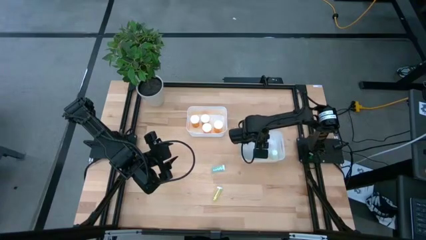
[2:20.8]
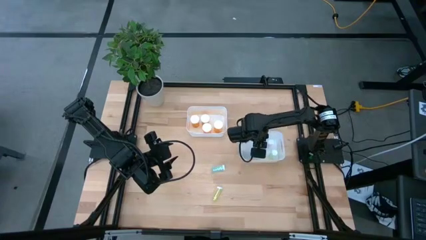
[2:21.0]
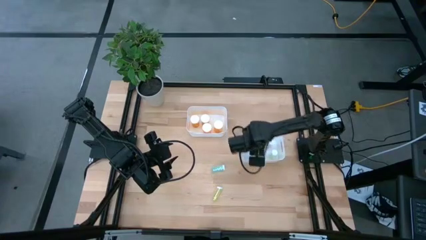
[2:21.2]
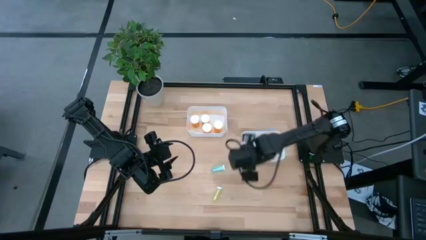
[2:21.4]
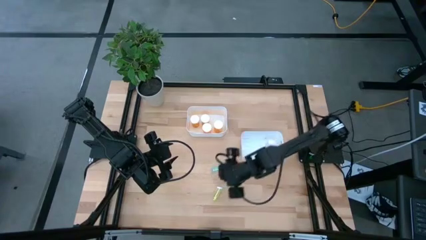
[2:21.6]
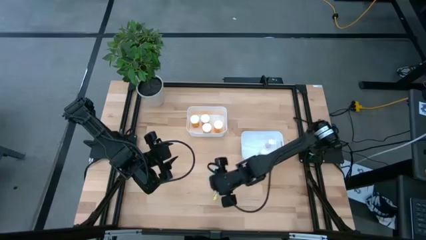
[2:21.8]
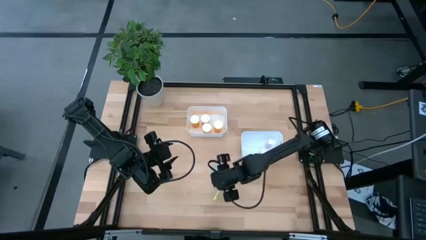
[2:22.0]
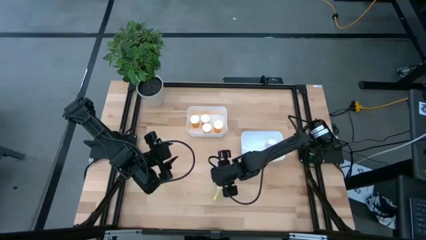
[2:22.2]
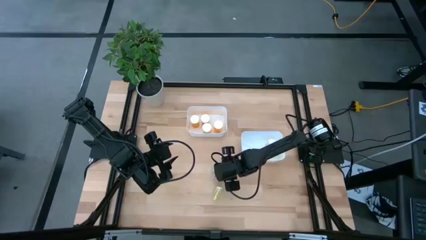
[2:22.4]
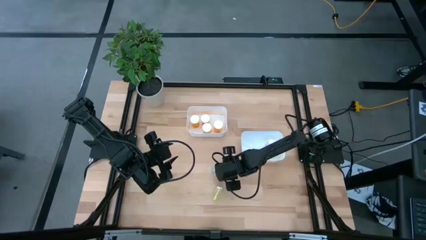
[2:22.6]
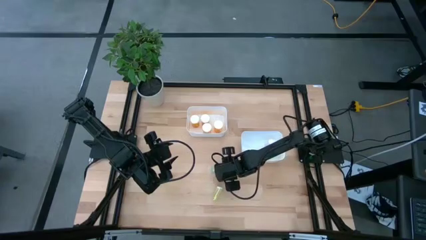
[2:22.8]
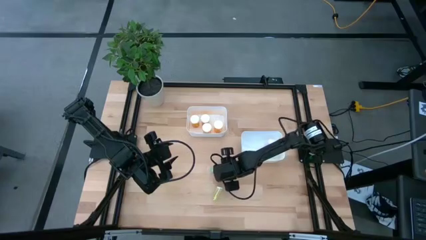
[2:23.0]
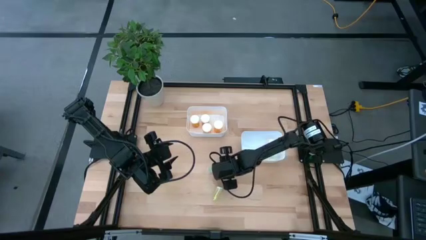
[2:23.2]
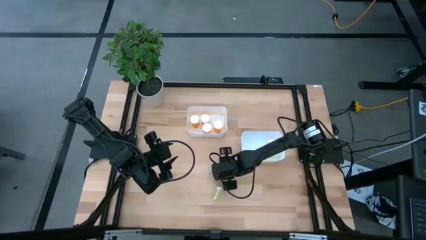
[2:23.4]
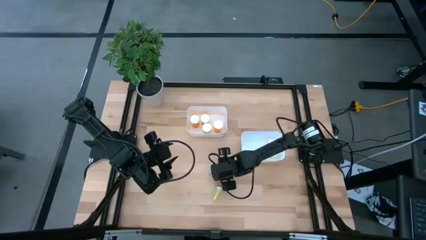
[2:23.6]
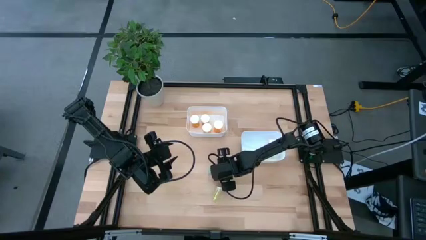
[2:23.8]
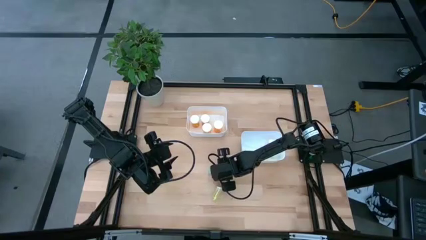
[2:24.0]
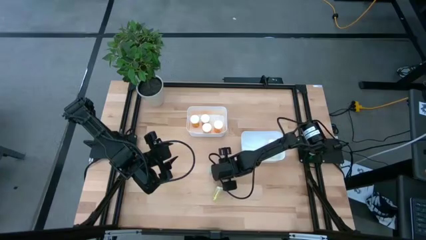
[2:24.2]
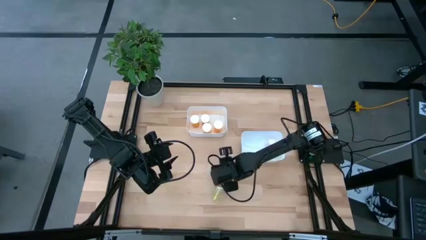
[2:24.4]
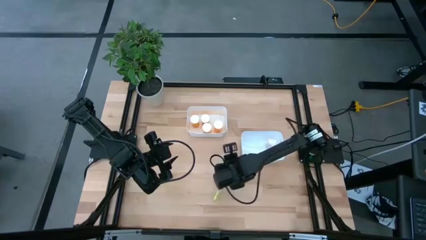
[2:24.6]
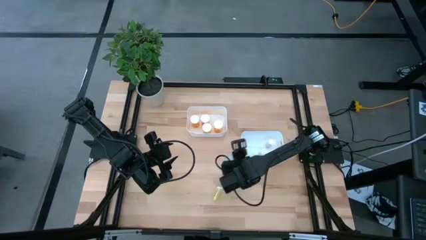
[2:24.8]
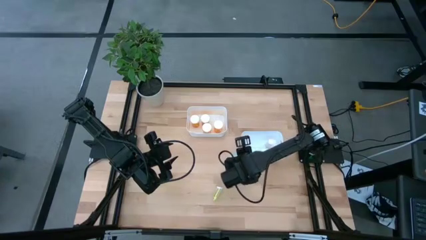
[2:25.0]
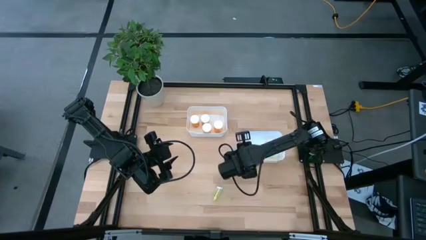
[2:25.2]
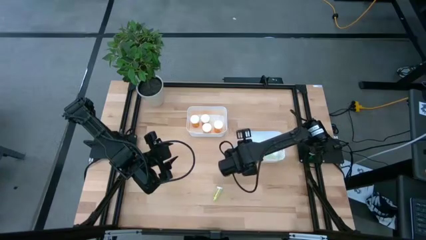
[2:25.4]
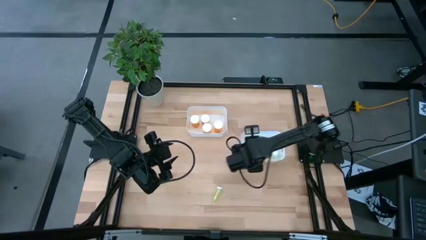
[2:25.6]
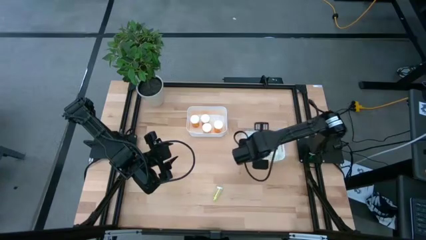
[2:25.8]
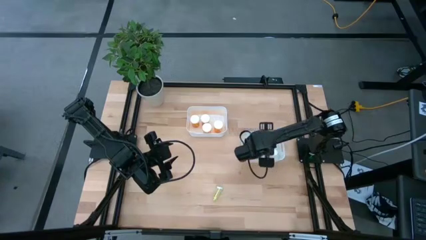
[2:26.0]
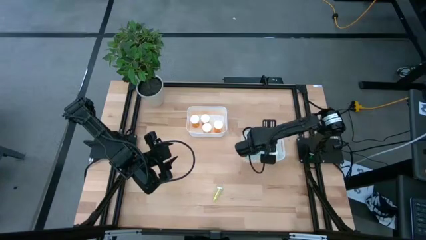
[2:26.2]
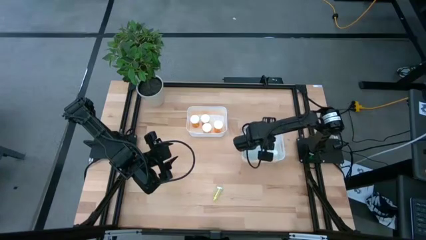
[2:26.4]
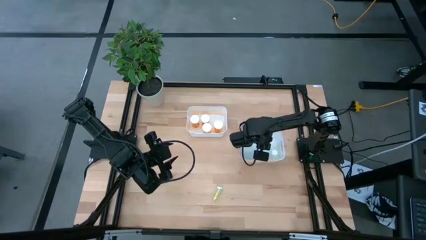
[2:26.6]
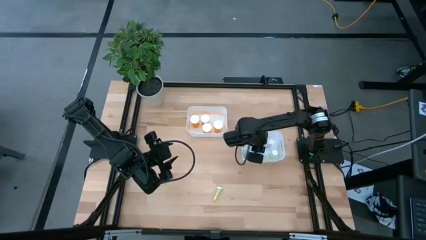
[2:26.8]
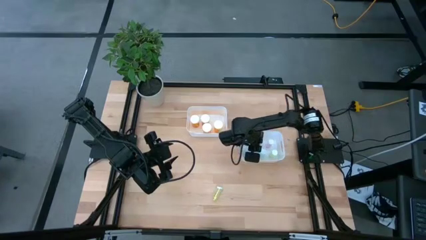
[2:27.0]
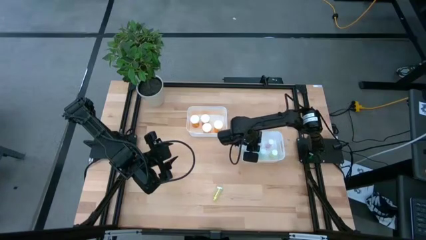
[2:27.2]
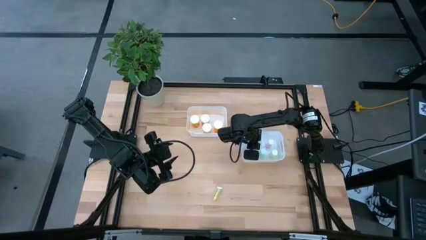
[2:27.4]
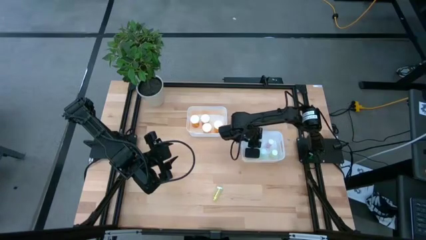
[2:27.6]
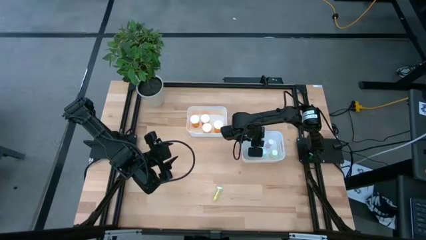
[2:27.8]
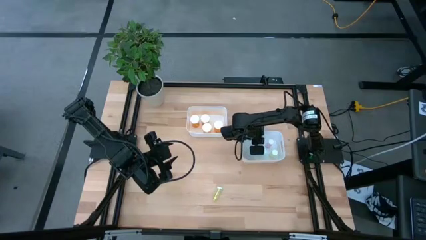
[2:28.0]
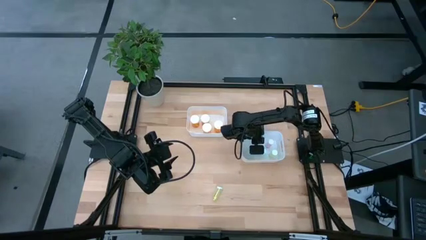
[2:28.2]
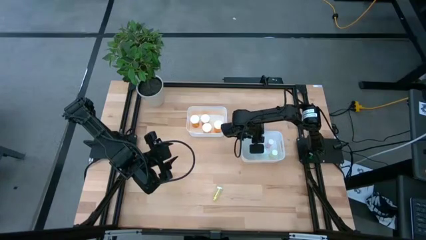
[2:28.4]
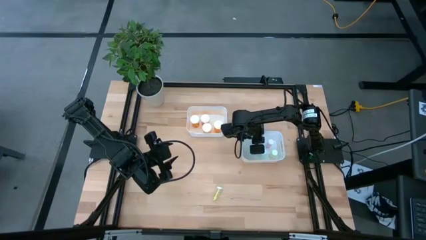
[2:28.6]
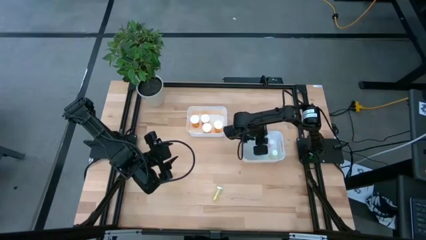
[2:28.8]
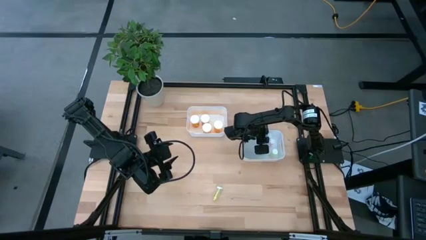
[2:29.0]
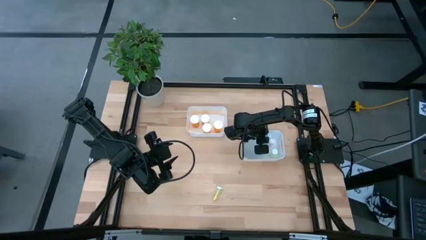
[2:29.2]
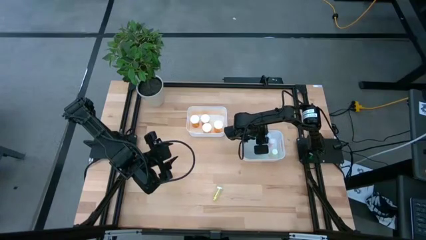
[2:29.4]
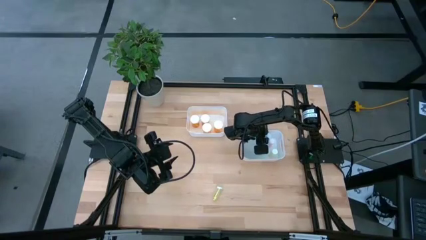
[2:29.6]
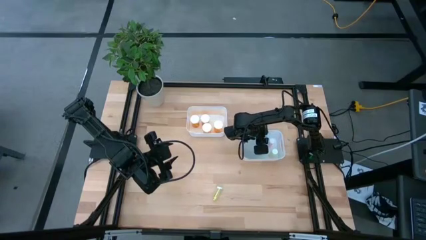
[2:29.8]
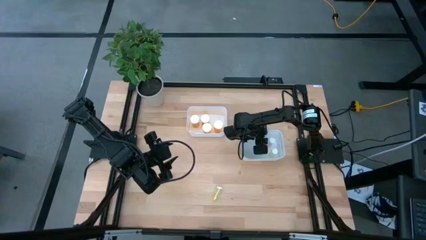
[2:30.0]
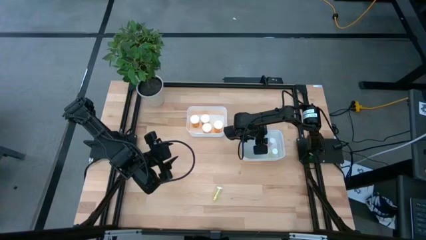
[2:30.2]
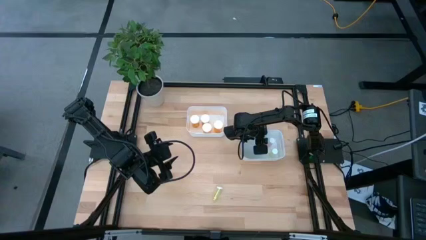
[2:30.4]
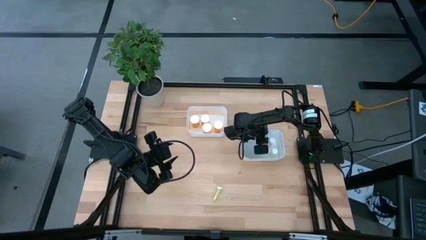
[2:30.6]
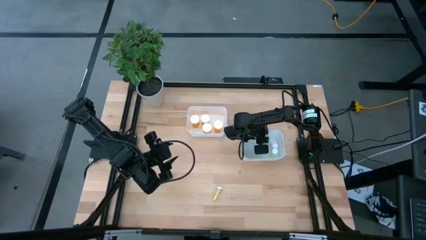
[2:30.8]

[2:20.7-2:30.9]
Task: Pick and place medicine bottles into bin by pill shape (circle, oval)
Put the small blue pill bottle into the bottom white bin

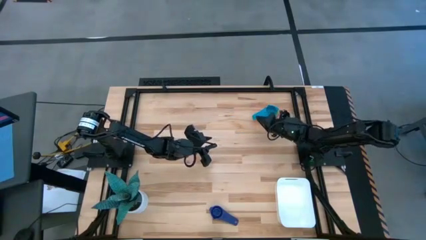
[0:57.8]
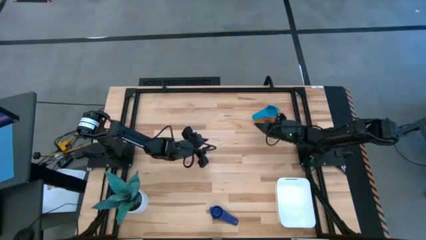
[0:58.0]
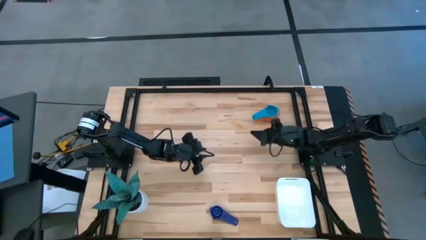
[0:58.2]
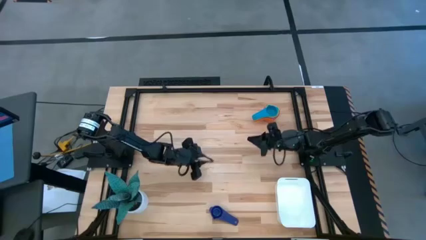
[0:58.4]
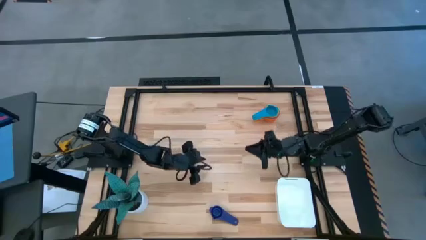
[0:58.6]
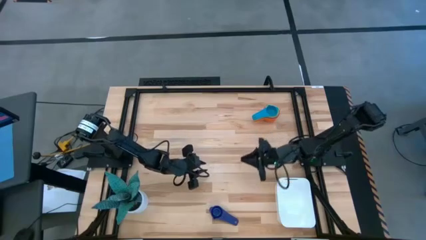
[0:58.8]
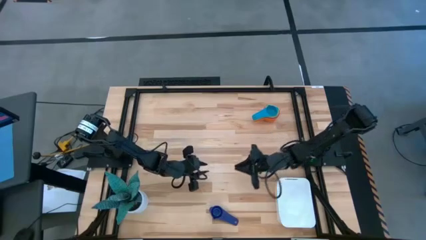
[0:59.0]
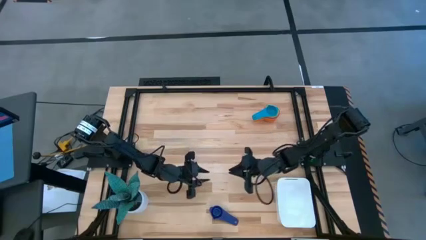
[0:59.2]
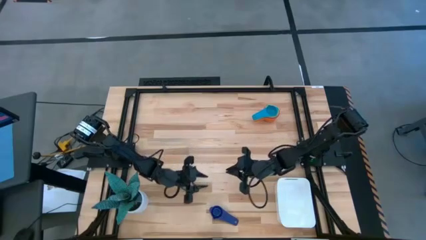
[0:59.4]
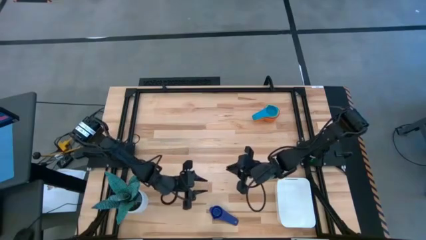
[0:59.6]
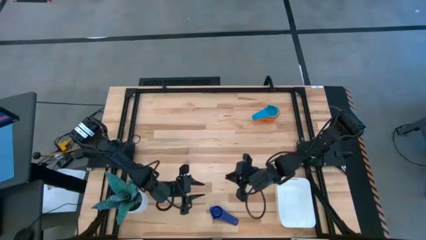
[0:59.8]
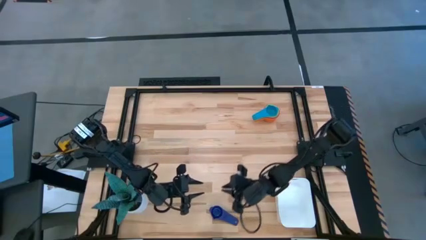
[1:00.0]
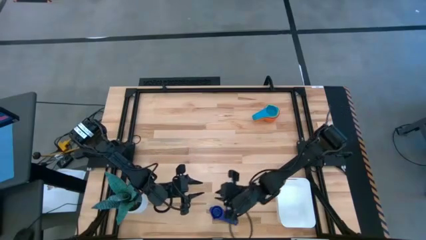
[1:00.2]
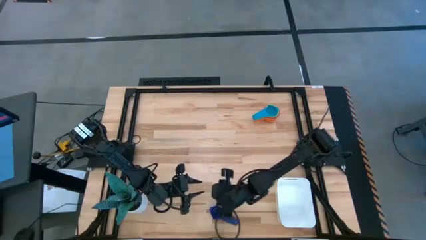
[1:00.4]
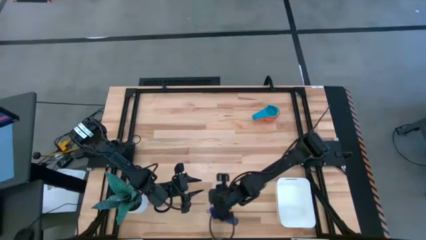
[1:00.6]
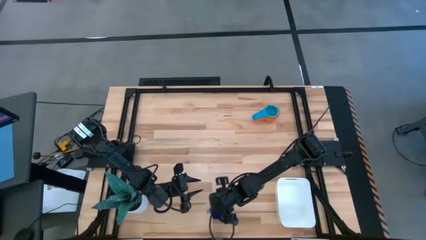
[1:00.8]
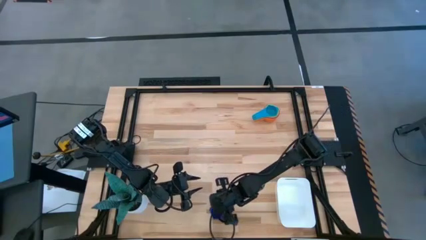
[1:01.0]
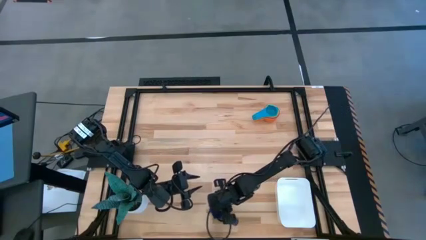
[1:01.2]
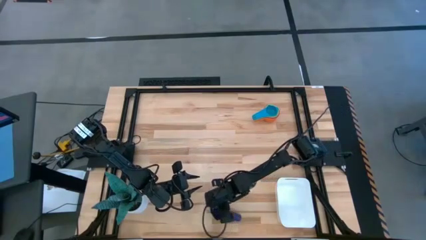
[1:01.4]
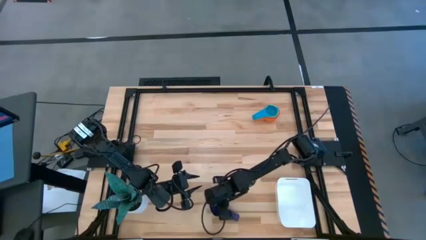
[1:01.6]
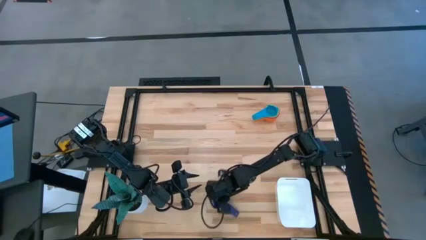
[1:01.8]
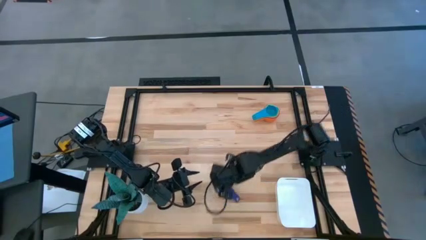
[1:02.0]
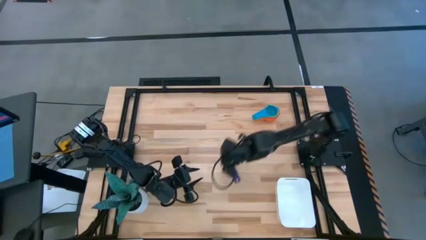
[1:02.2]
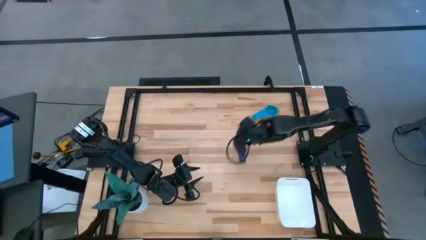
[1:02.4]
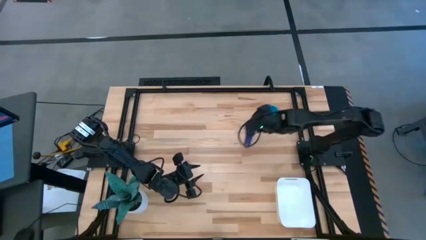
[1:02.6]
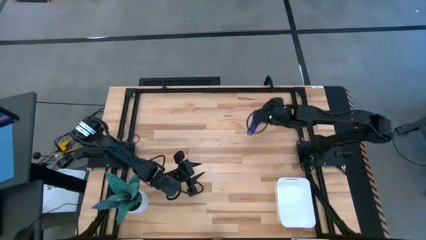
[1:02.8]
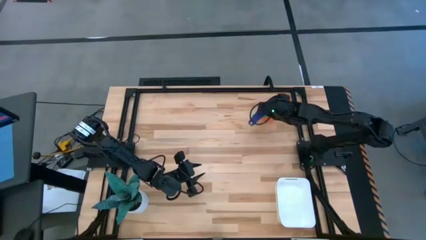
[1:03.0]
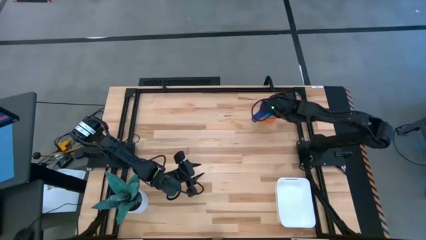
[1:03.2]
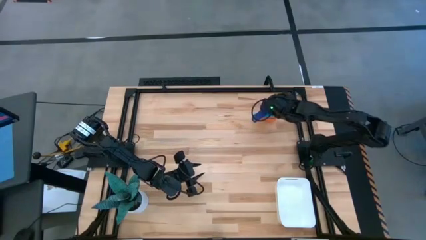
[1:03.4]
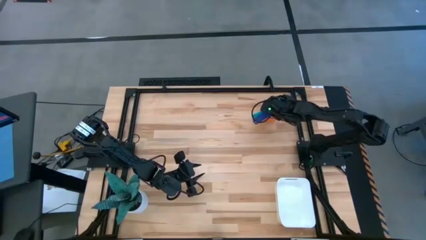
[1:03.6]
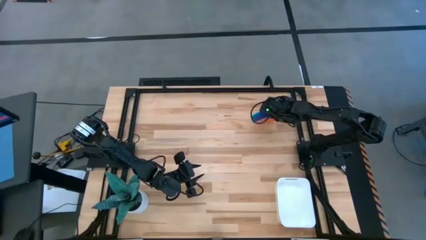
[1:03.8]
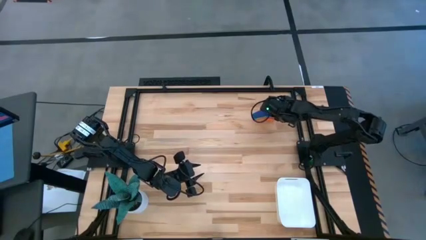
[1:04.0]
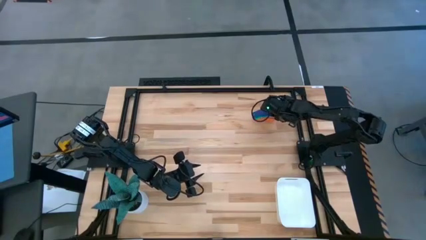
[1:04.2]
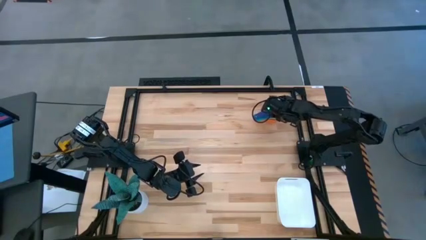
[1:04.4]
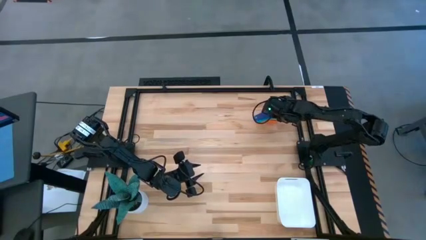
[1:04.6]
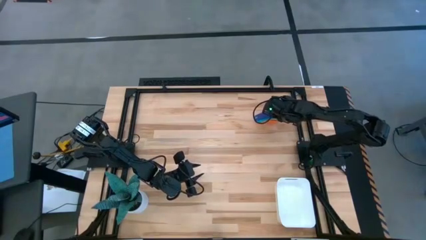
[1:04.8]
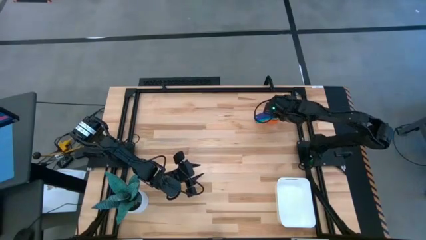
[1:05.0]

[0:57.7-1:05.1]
Task: Nest measuring cups in basket
Stack the dark blue measuring cup on the light blue measuring cup
